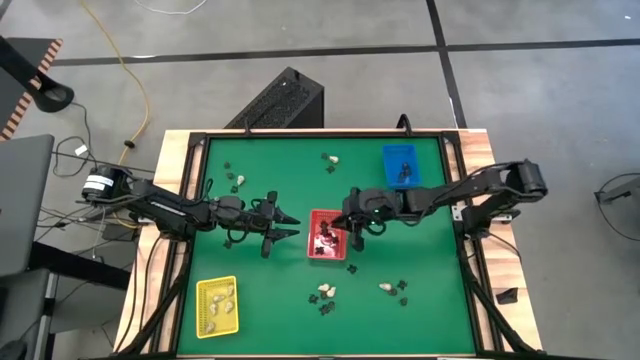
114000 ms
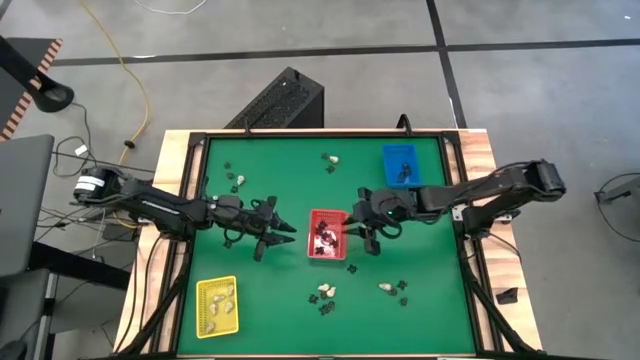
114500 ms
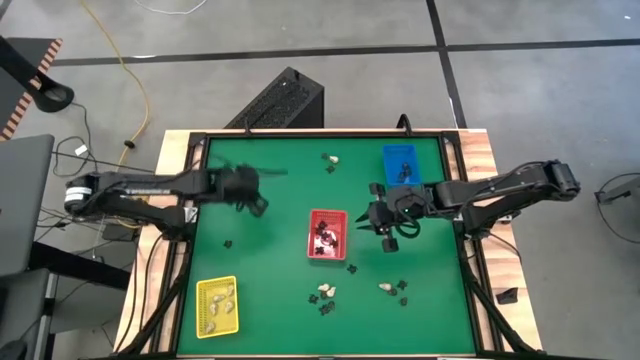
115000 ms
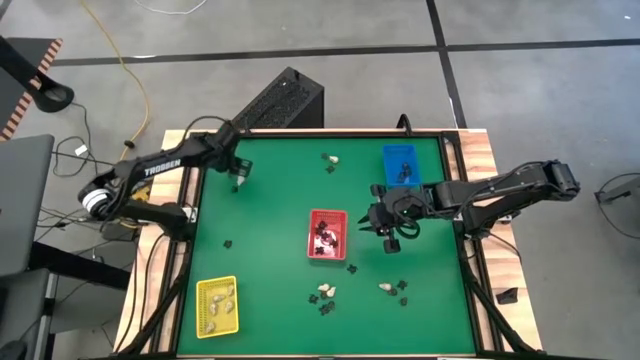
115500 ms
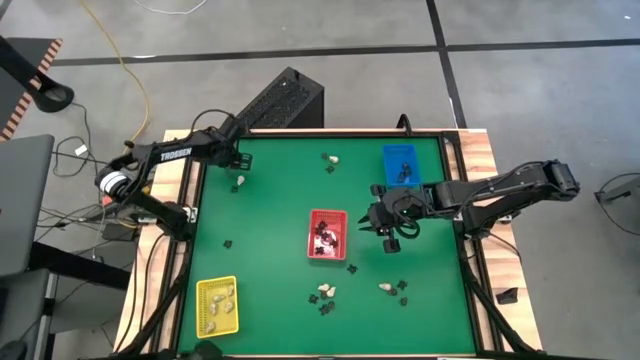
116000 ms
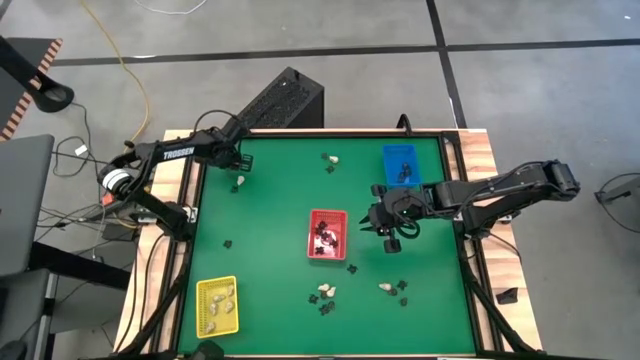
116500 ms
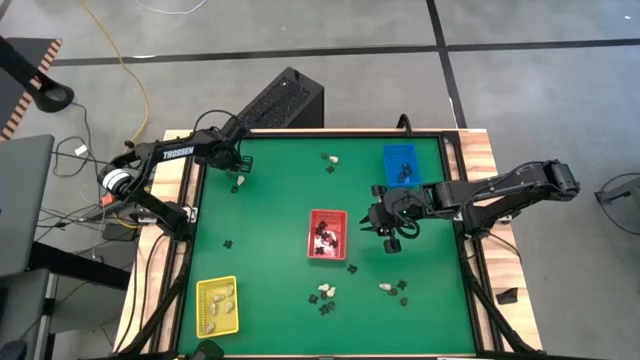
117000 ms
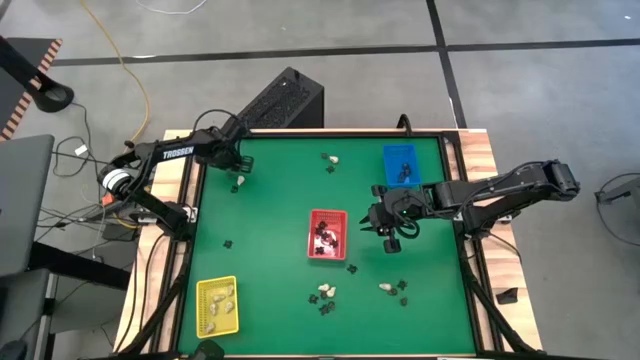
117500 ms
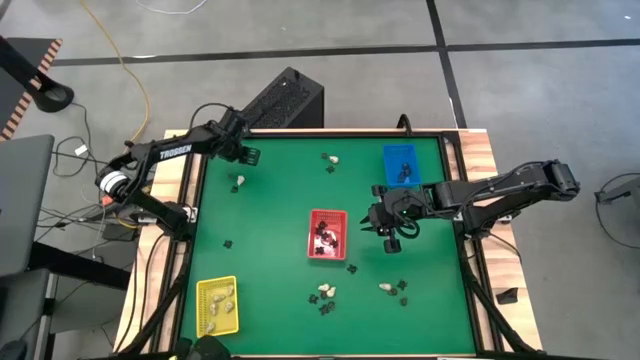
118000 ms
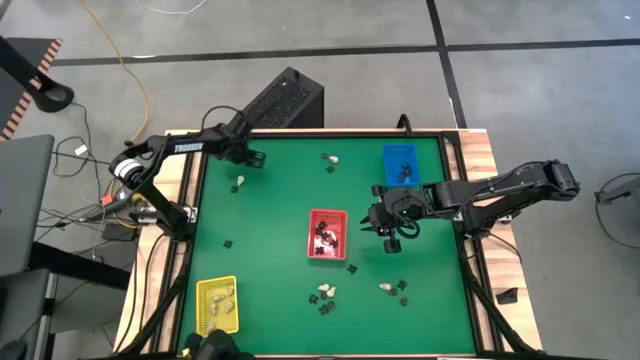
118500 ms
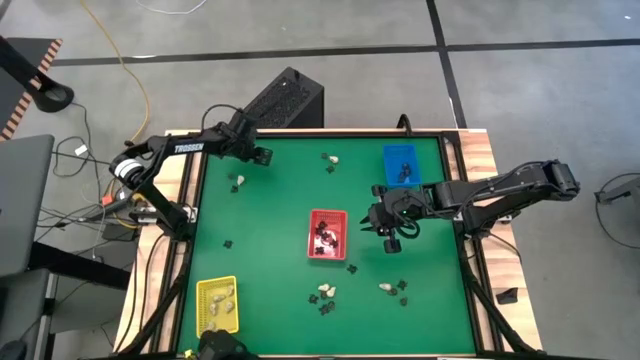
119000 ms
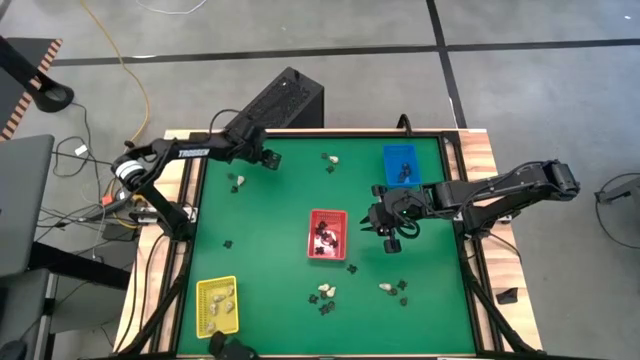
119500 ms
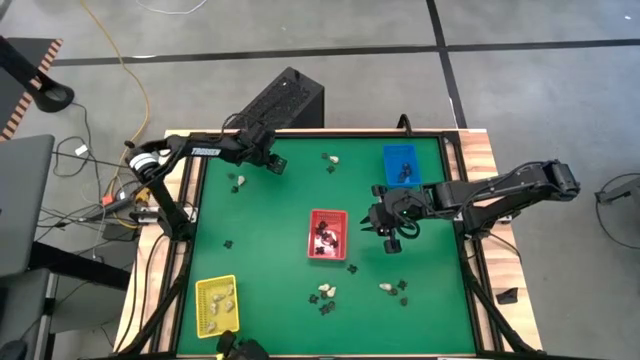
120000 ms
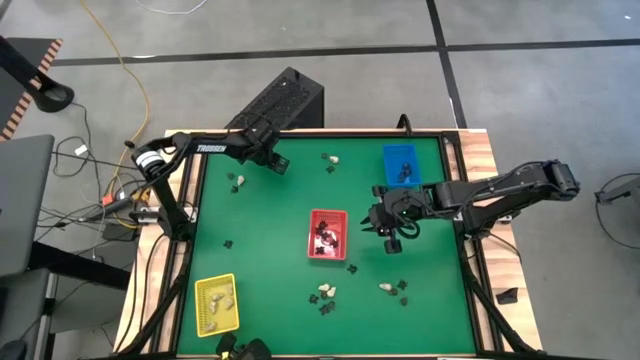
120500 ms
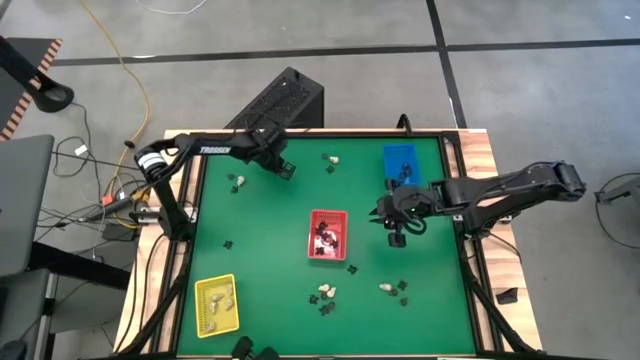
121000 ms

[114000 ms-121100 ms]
Task: Sort Halloween decoration
Put the black skull toy into the blue bin

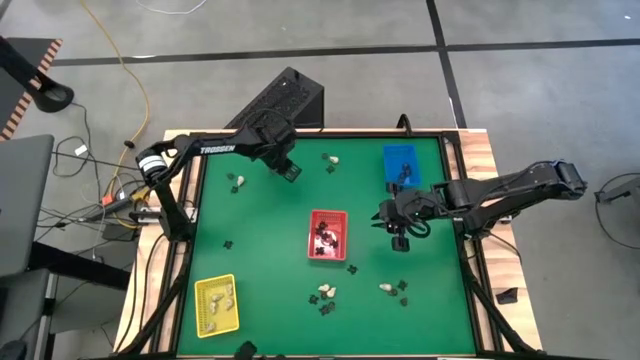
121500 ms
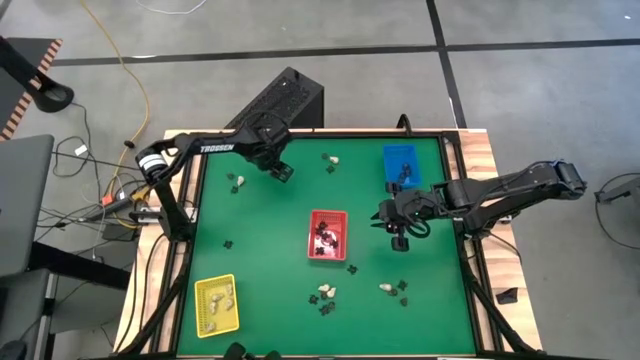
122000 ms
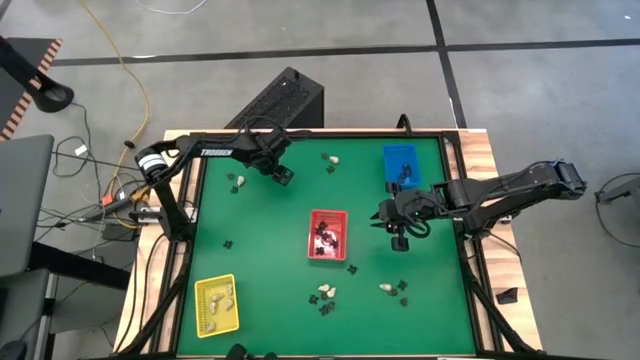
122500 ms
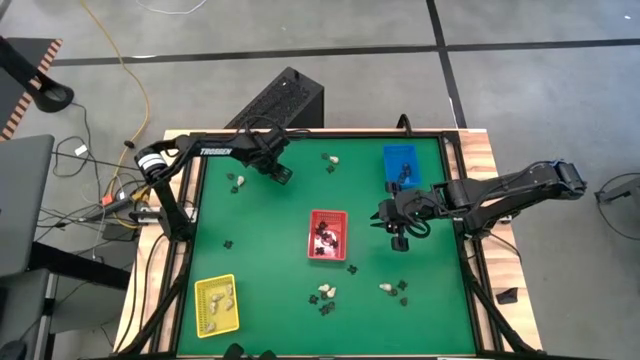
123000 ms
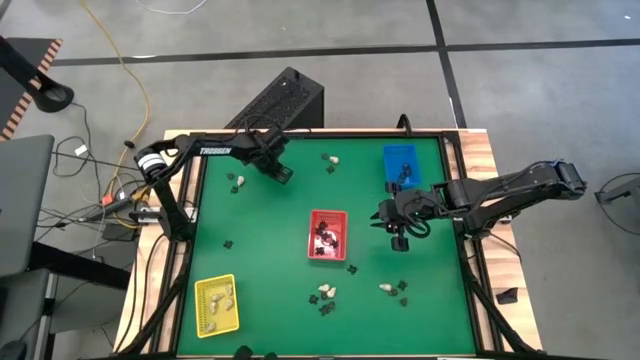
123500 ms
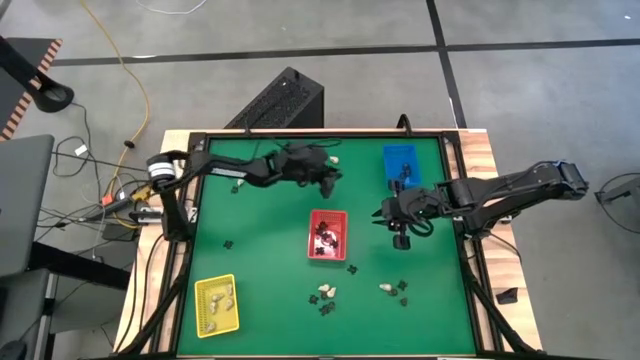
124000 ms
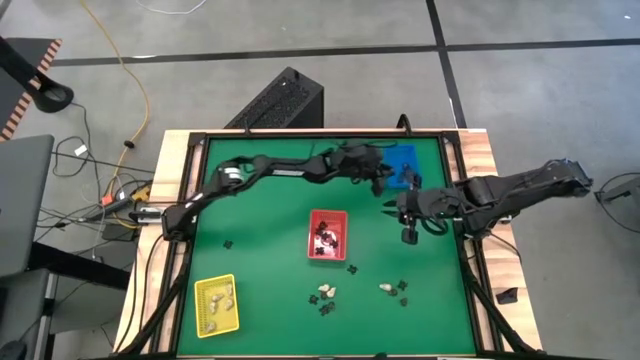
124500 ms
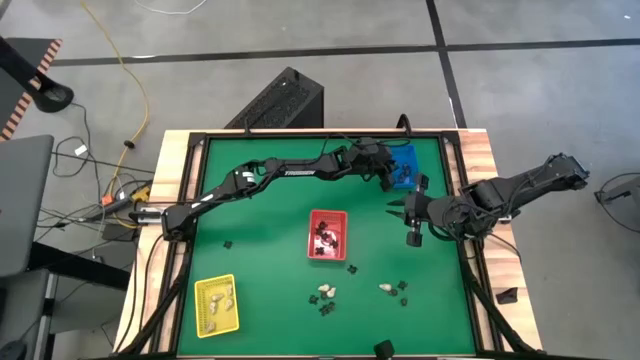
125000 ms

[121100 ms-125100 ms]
Put the black skull toy into the blue bin

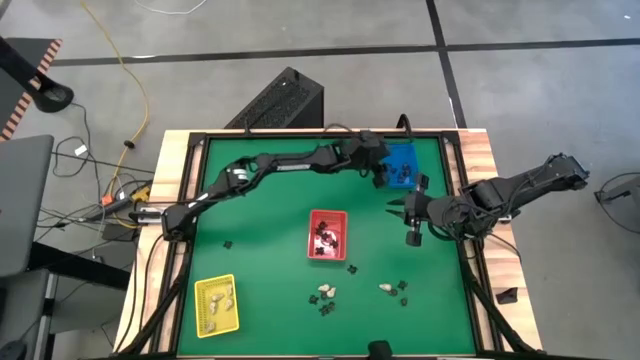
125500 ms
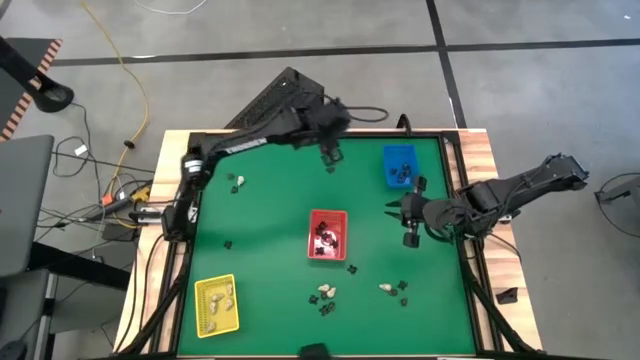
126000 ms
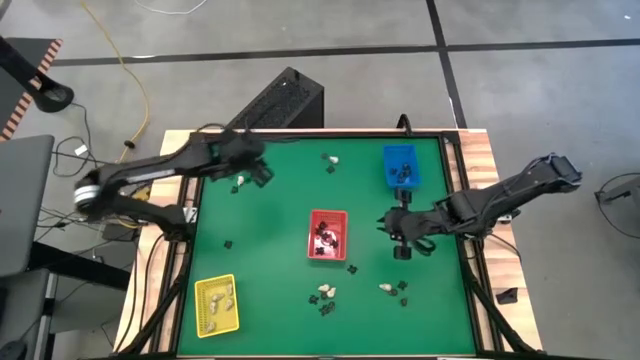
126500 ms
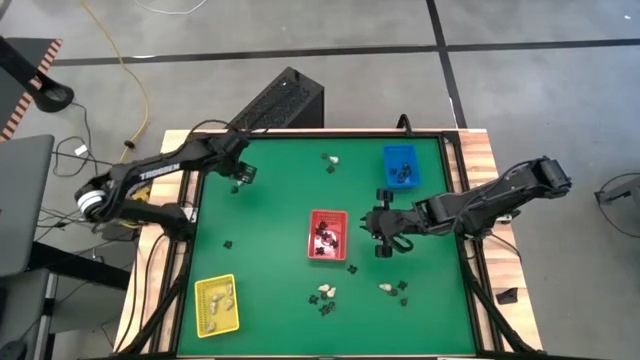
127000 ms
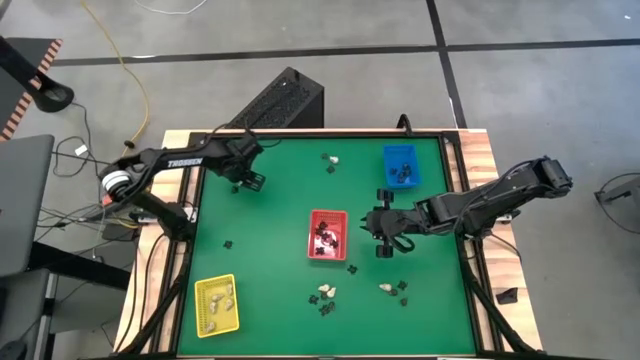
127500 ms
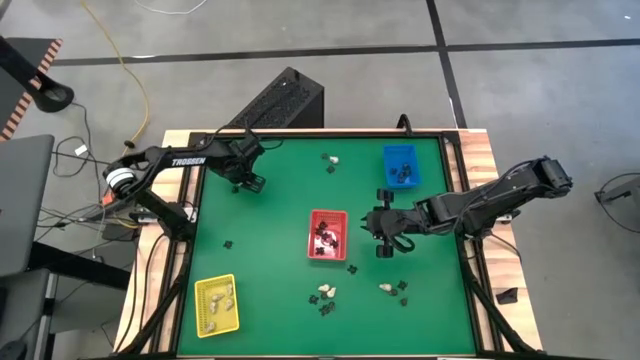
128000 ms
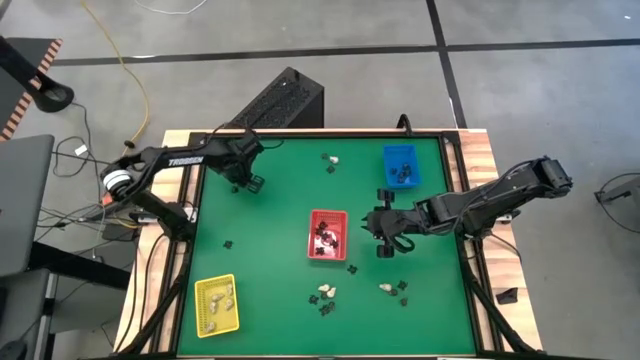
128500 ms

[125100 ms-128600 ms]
Put the white skull toy into the yellow bin

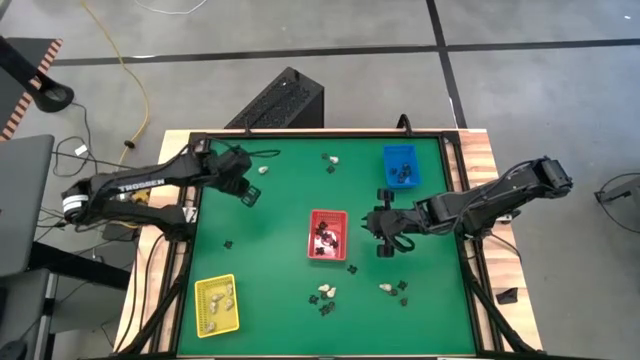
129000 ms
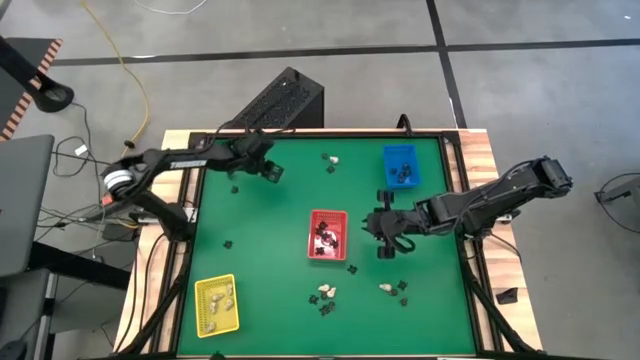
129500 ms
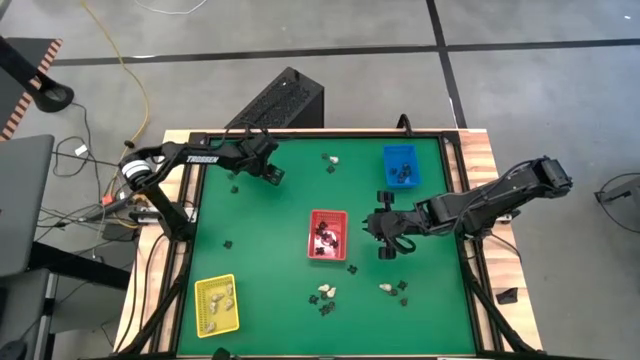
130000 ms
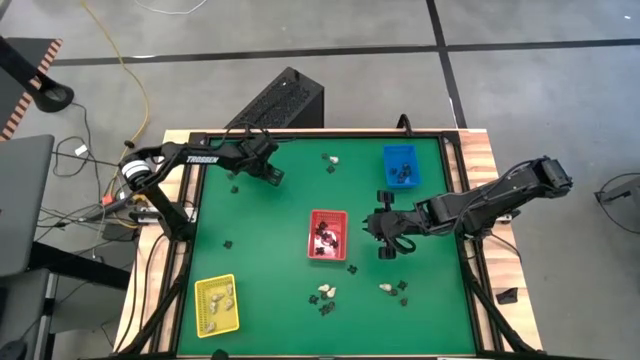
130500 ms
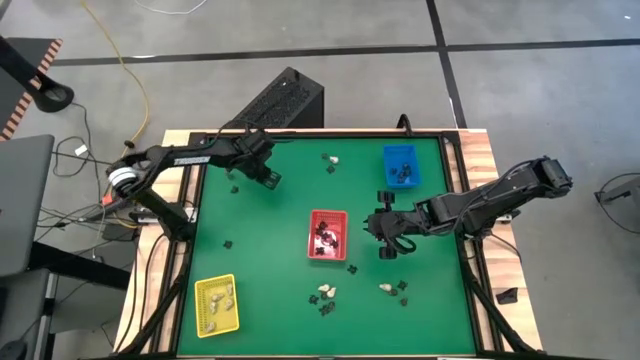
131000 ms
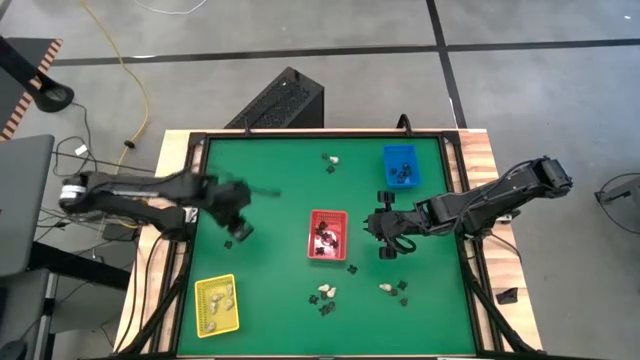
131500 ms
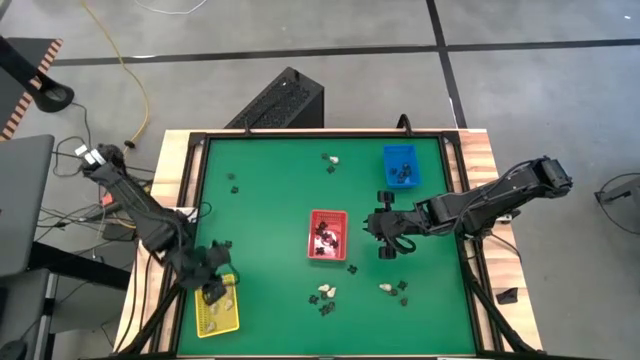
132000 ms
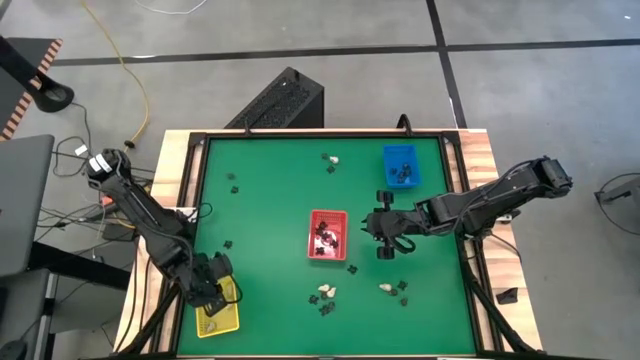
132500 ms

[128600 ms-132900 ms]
Put the white skull toy into the yellow bin

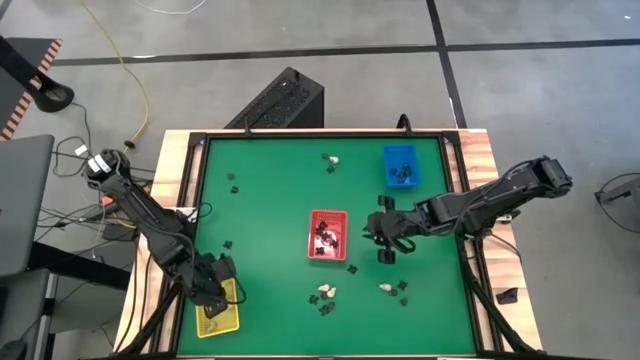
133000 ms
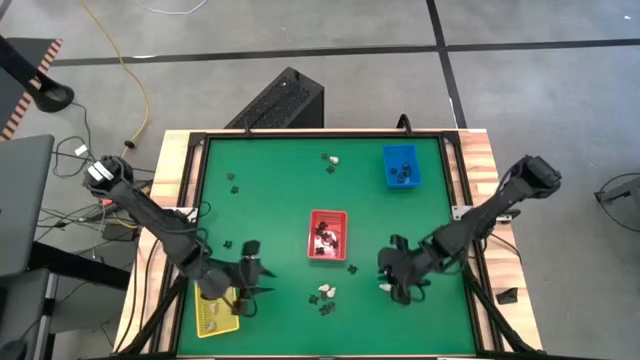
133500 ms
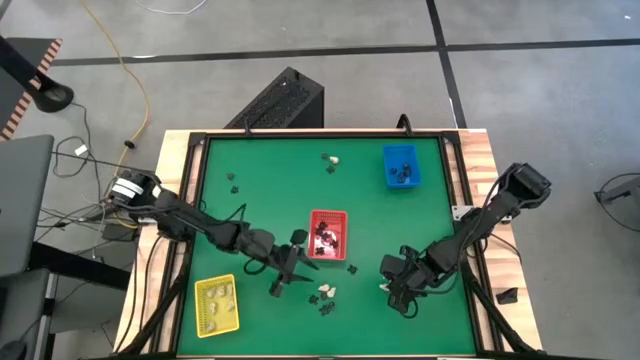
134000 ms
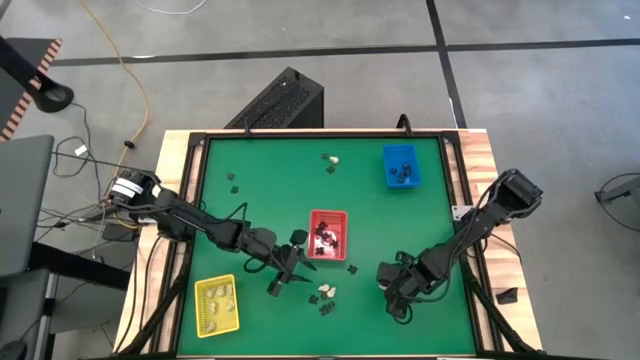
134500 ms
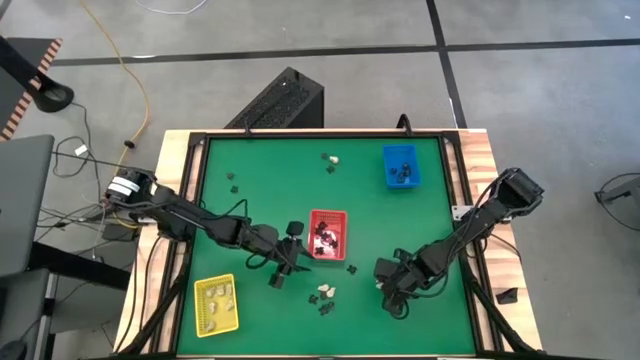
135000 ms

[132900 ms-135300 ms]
Put the white skull toy into the yellow bin
